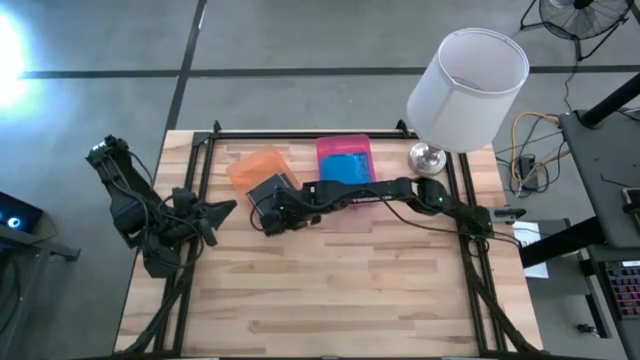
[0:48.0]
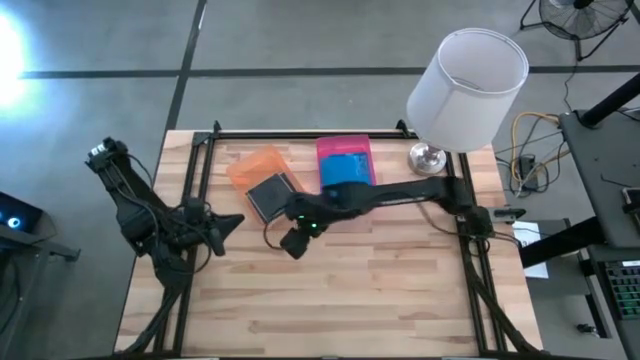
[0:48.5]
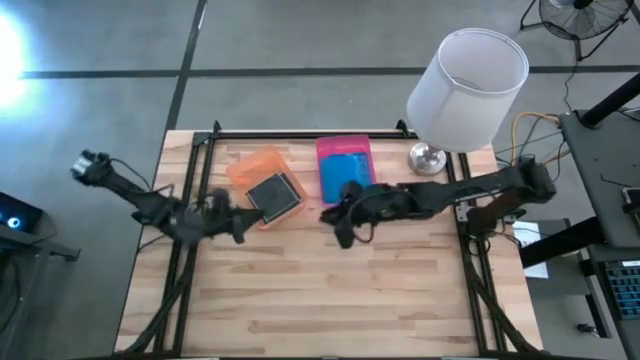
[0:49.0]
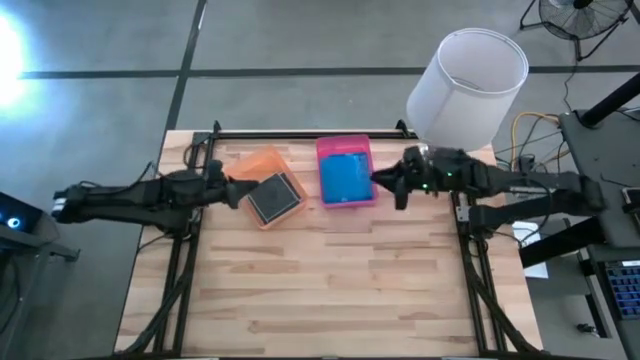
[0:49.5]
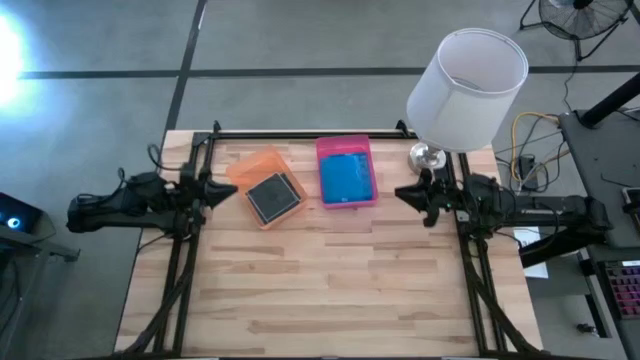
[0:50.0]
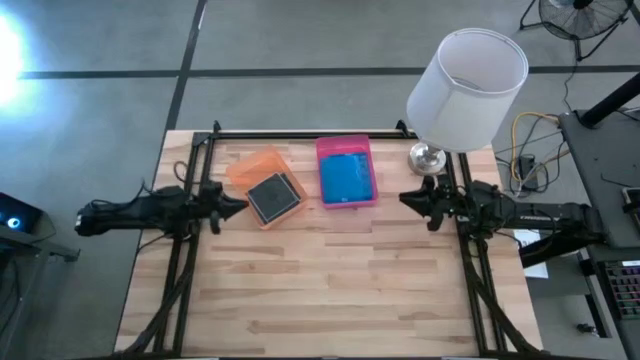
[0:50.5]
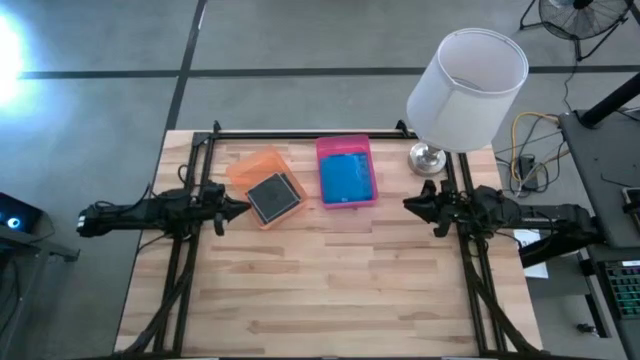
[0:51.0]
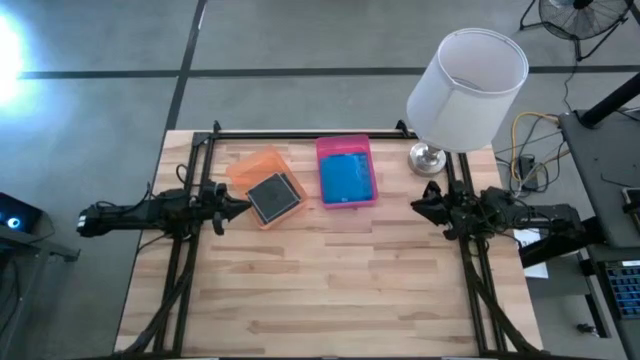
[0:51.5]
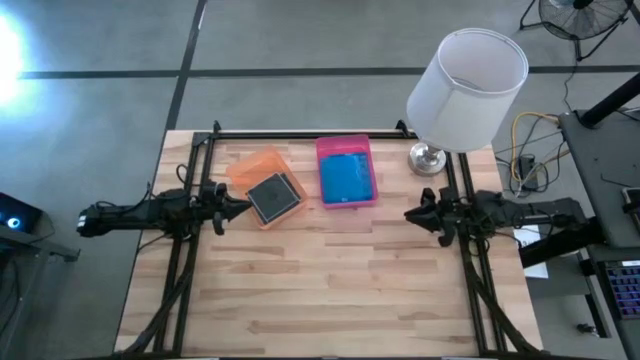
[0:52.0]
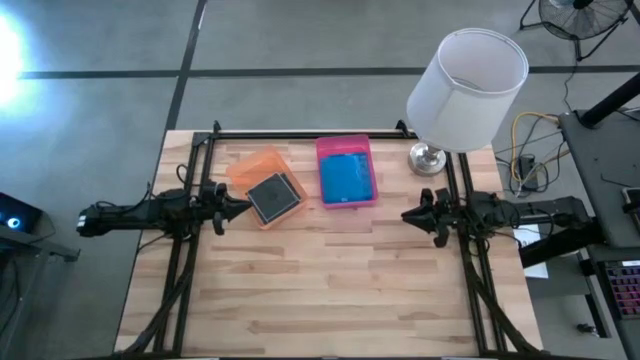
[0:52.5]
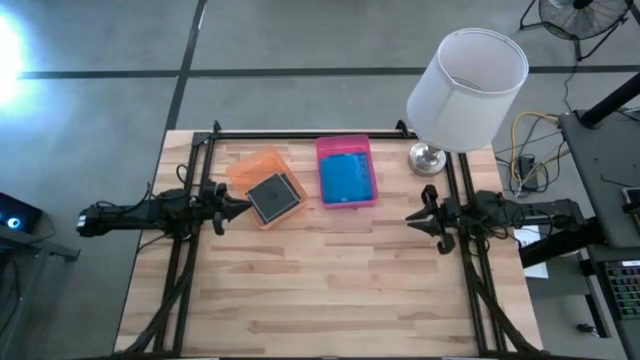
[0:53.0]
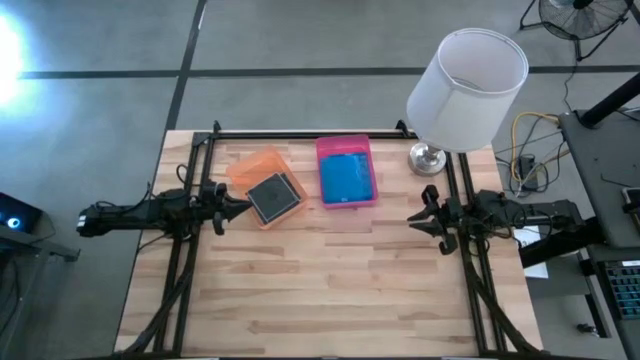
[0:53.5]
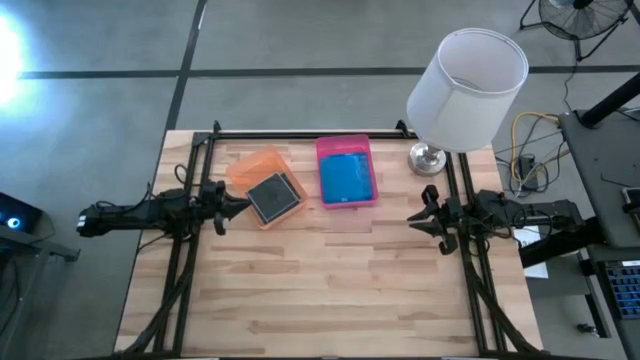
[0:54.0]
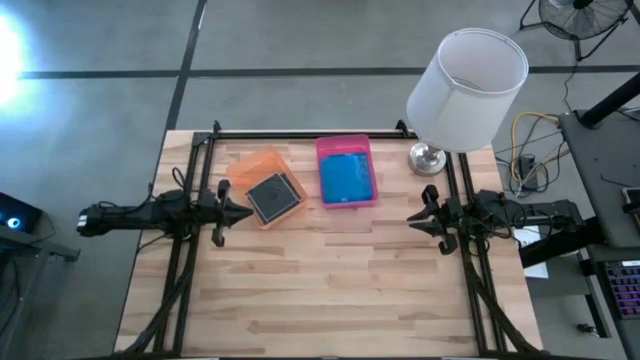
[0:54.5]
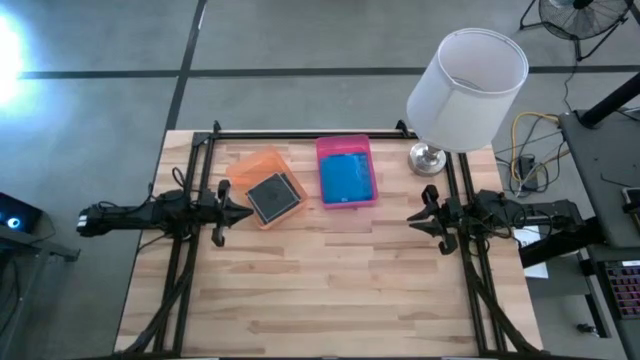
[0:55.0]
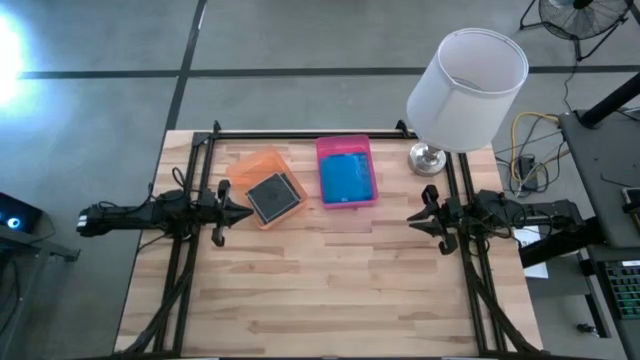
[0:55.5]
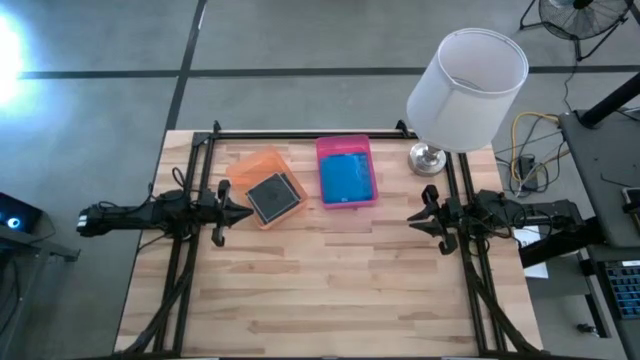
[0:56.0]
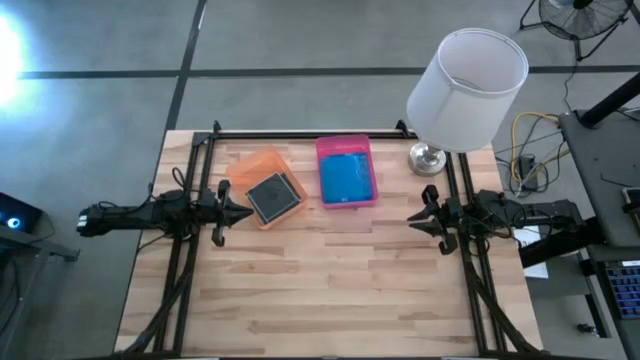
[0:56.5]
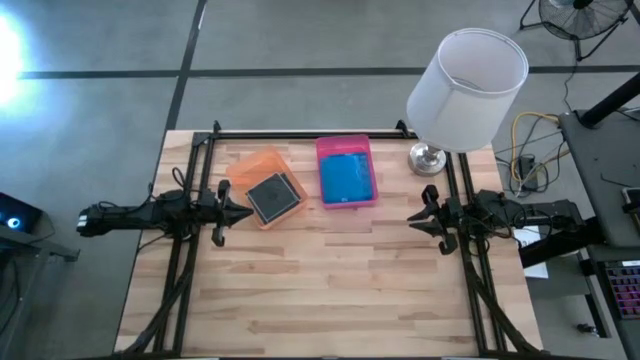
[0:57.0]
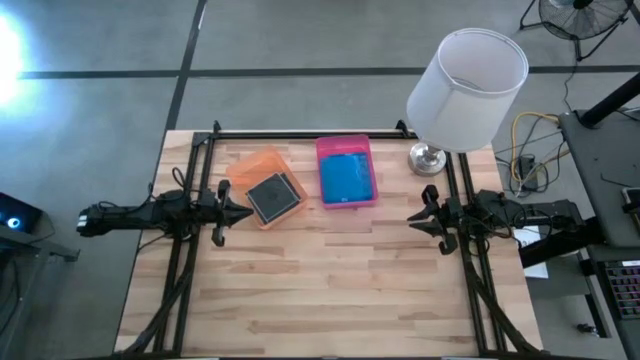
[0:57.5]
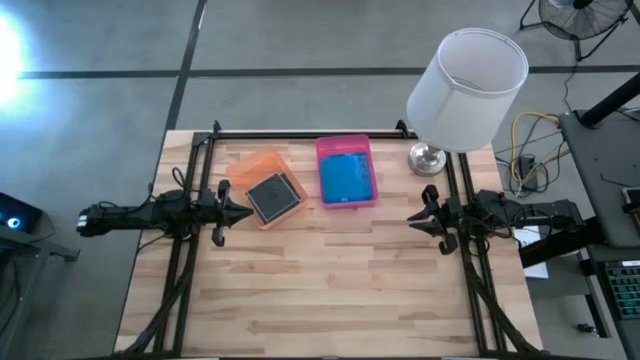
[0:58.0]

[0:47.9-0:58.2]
Task: Pick & place jewel cases by type
Return to Home Position

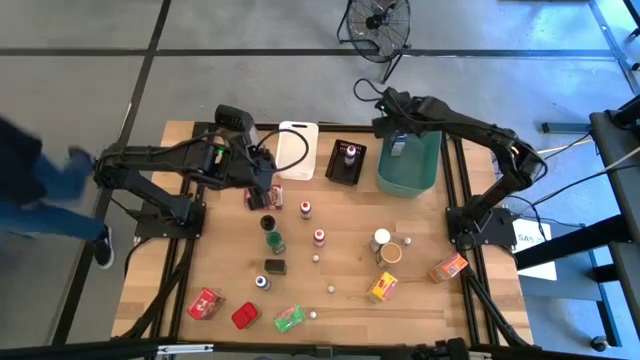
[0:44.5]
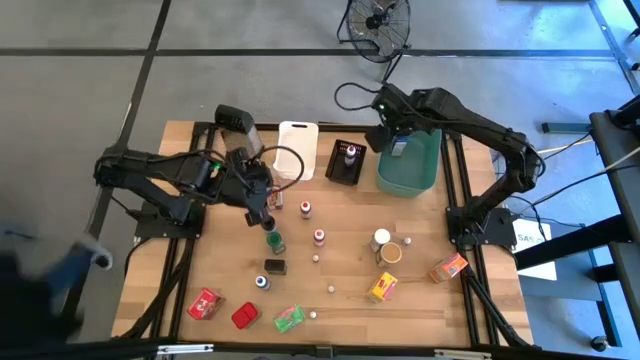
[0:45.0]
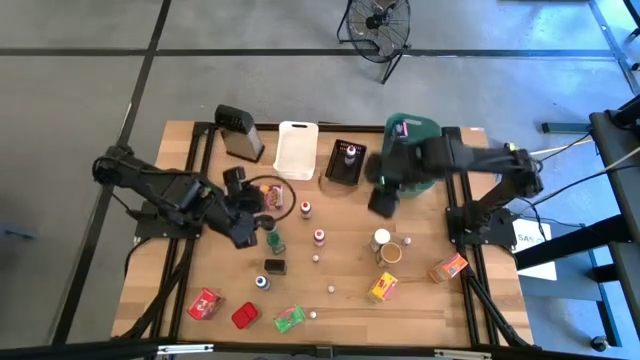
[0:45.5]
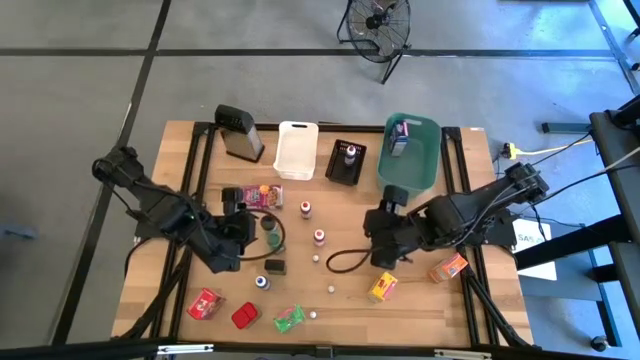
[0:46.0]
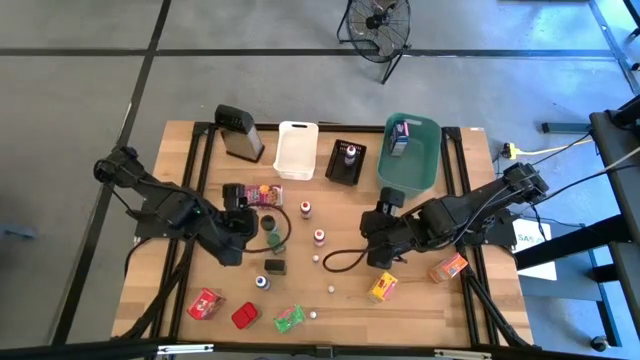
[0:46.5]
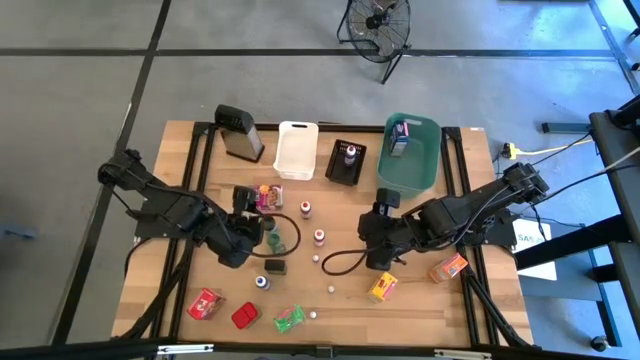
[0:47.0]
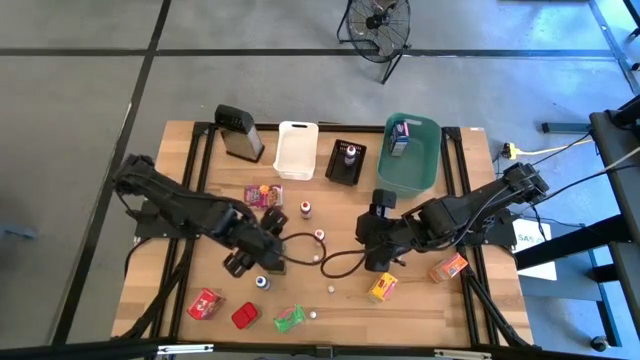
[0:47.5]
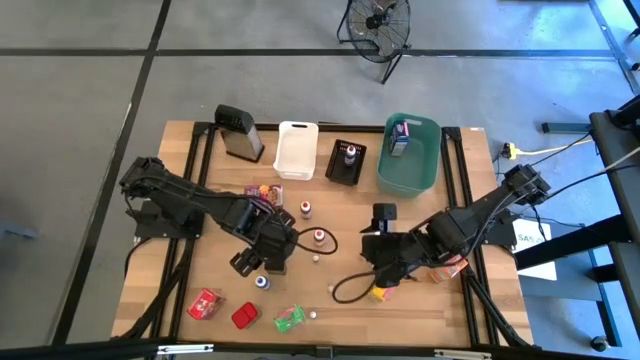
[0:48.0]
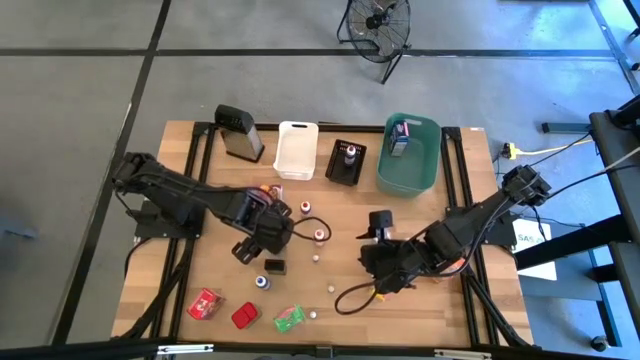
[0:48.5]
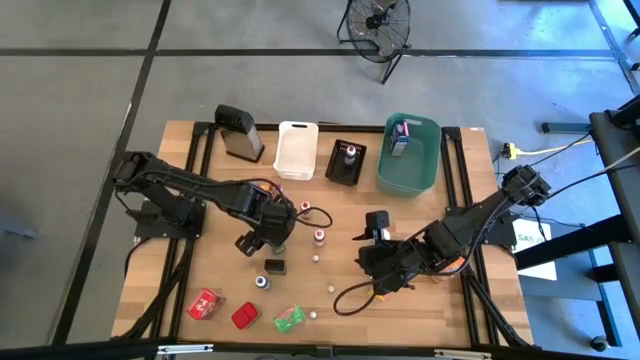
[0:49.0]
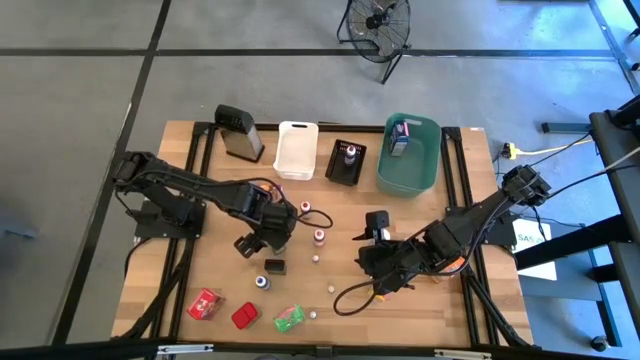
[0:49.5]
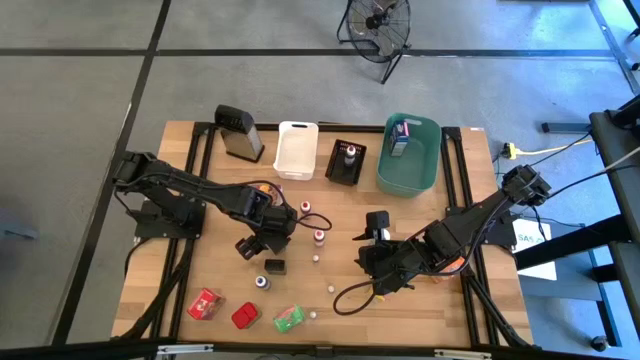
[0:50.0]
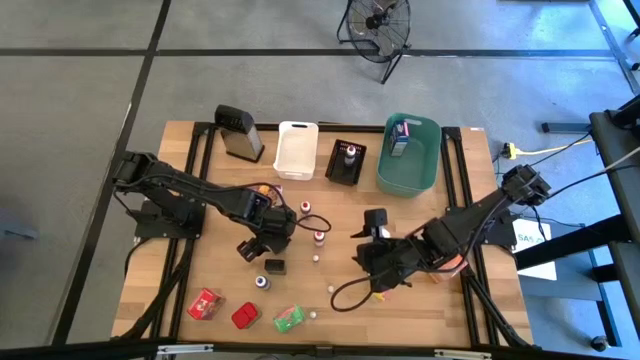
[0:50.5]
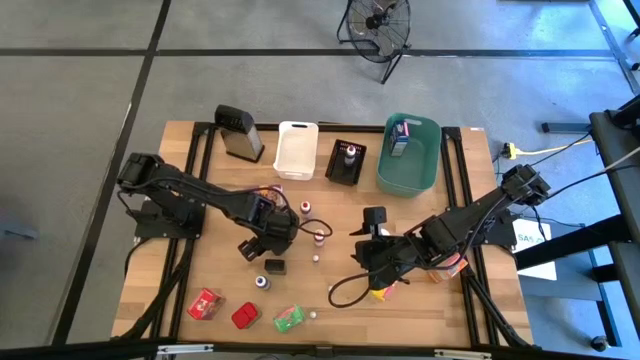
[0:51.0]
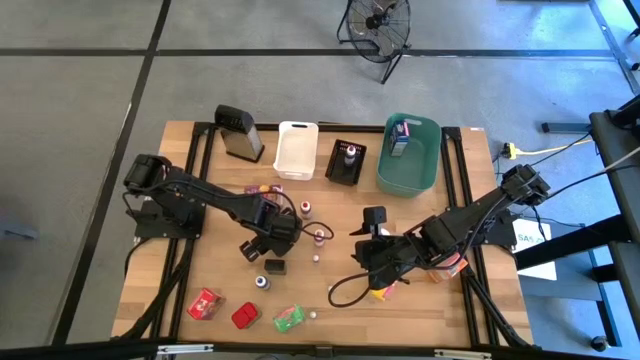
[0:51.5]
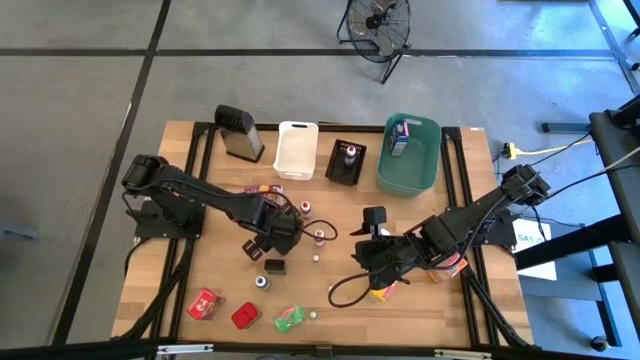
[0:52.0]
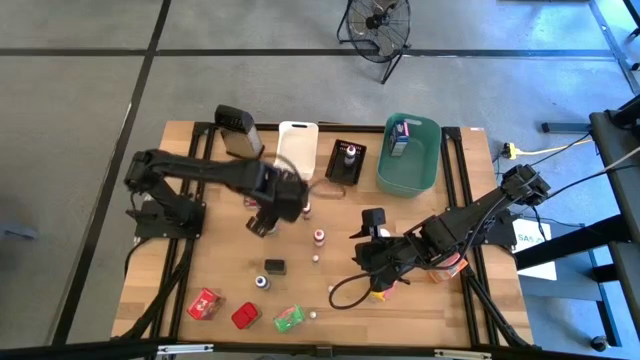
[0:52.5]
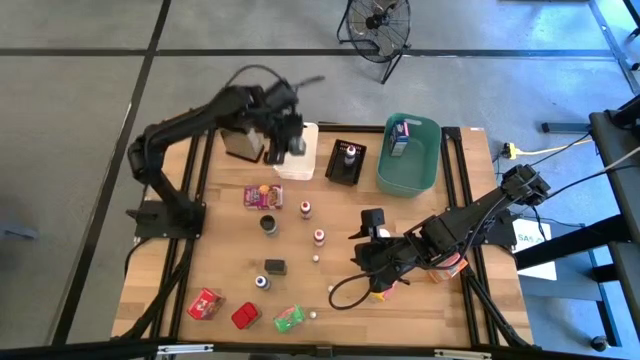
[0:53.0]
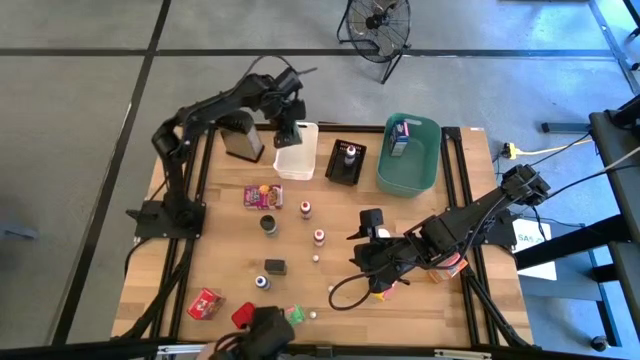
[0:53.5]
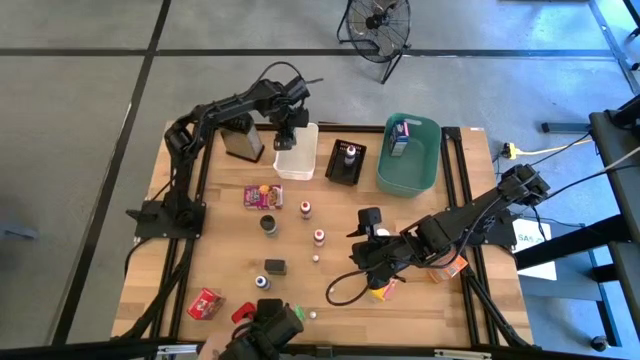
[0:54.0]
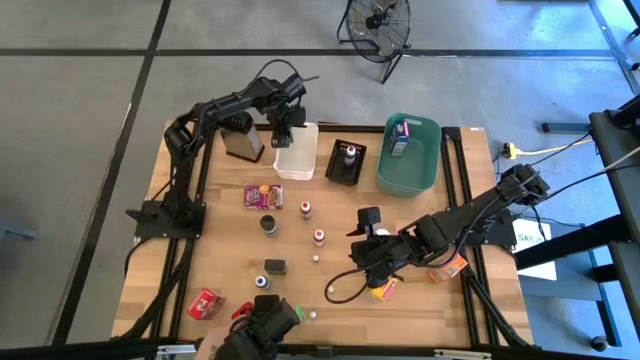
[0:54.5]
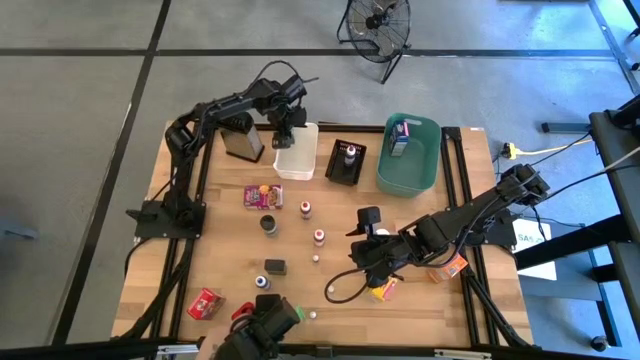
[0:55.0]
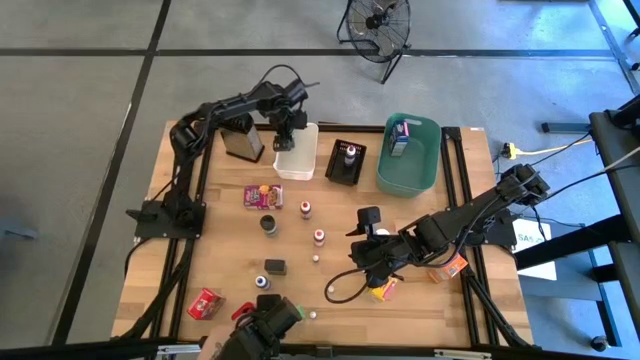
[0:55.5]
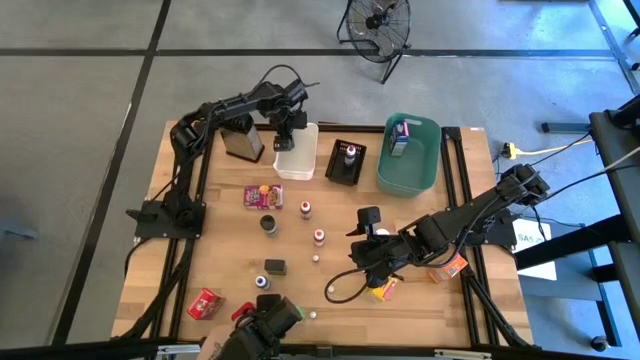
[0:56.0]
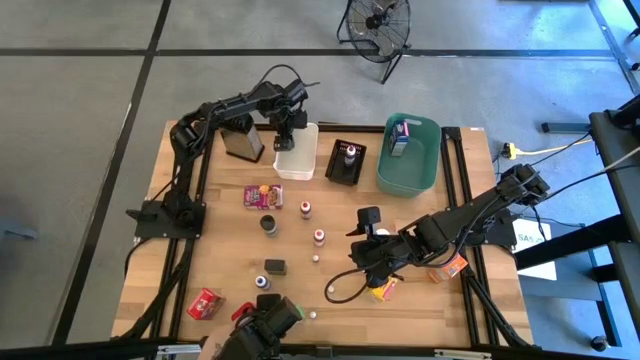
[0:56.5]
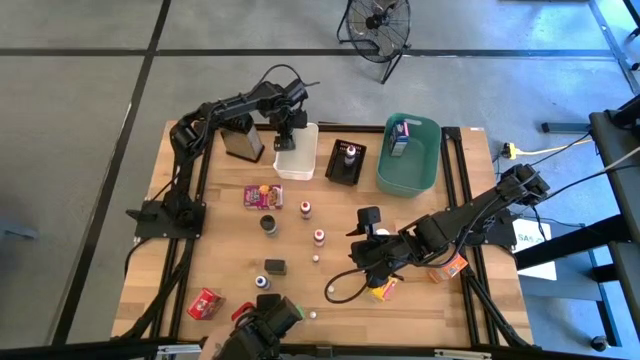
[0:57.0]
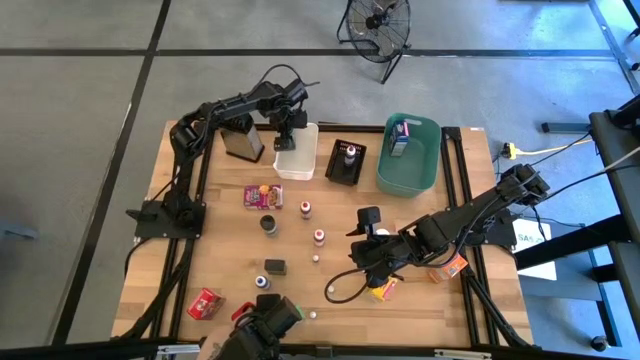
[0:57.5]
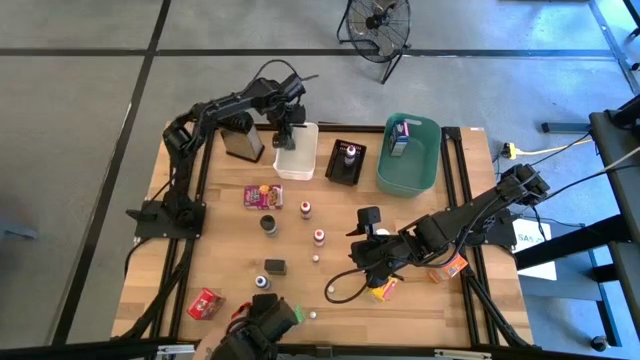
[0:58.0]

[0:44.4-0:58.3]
Task: Pick & Place Kitchen Items
Put the green seasoning bottle into the white bin
